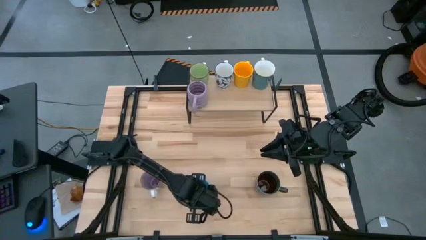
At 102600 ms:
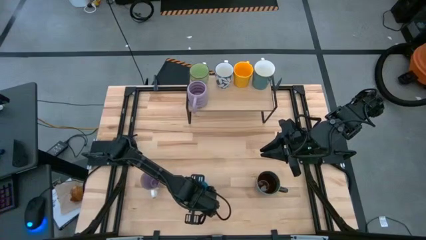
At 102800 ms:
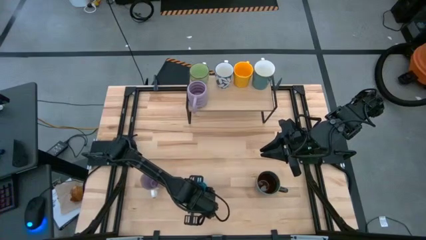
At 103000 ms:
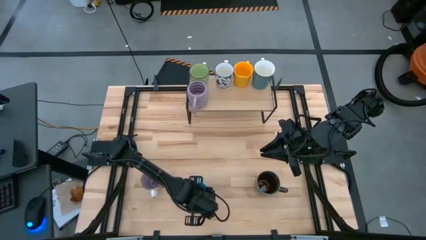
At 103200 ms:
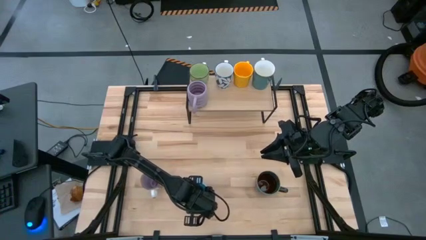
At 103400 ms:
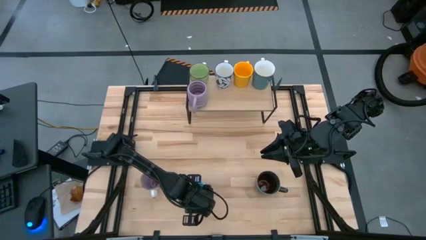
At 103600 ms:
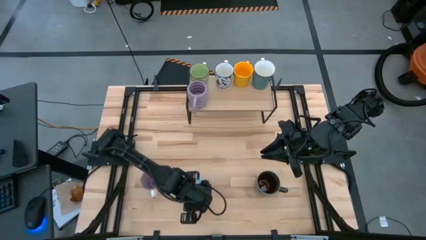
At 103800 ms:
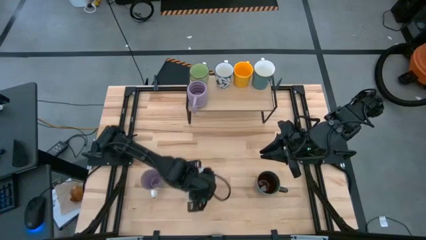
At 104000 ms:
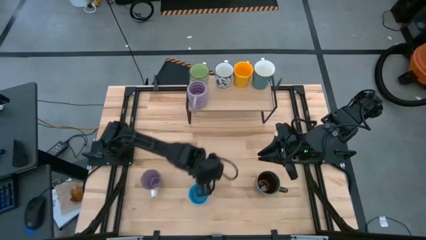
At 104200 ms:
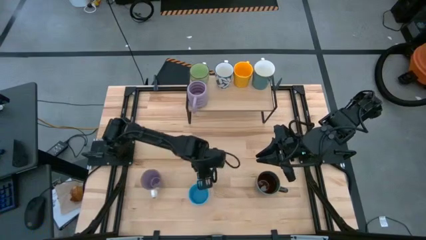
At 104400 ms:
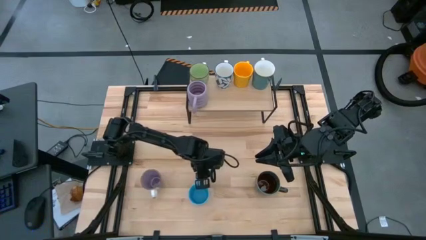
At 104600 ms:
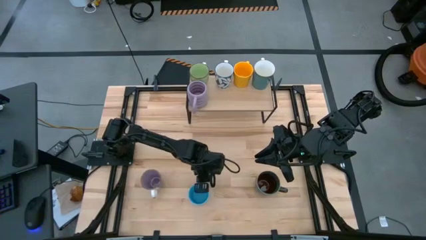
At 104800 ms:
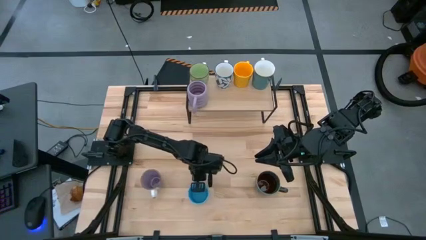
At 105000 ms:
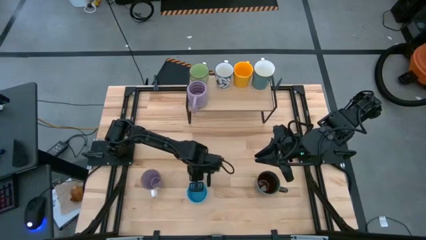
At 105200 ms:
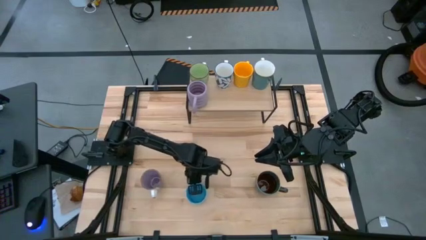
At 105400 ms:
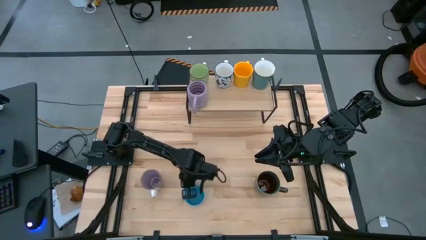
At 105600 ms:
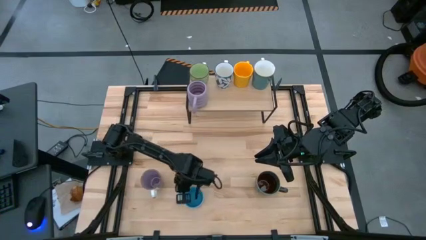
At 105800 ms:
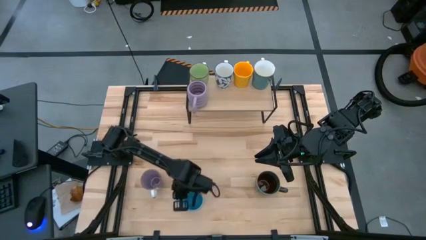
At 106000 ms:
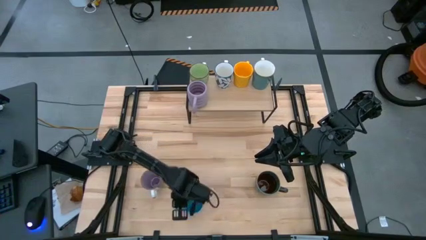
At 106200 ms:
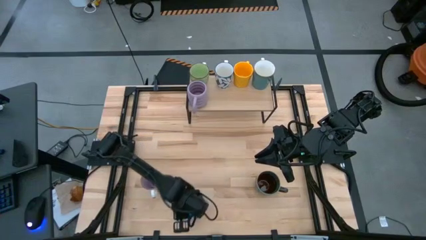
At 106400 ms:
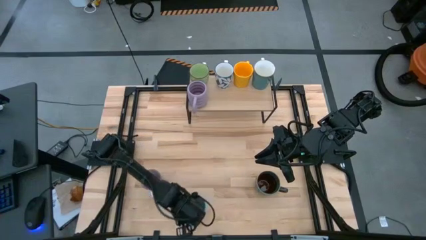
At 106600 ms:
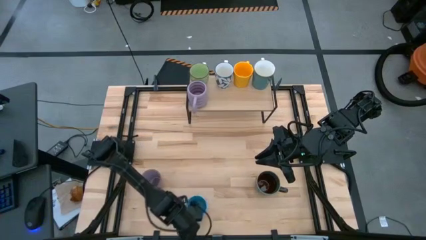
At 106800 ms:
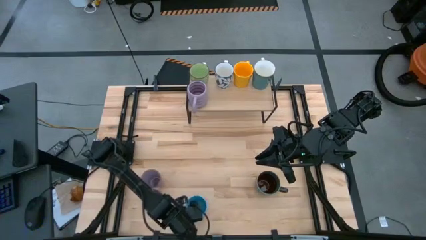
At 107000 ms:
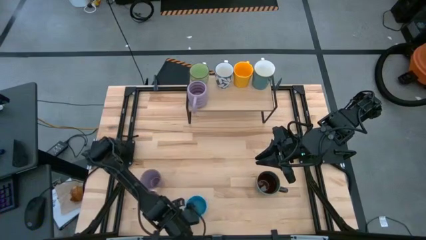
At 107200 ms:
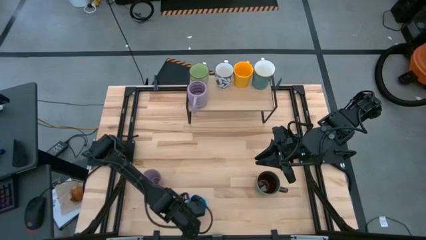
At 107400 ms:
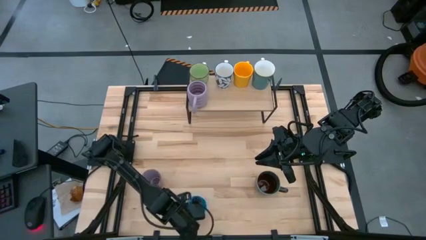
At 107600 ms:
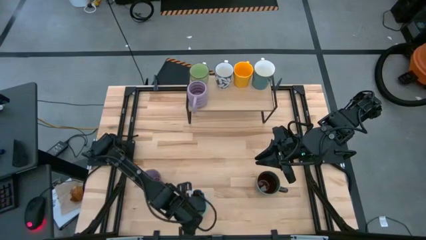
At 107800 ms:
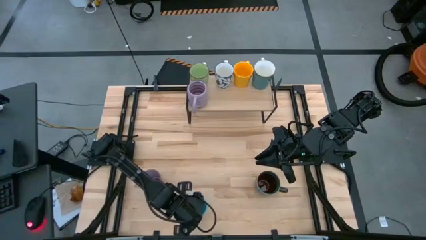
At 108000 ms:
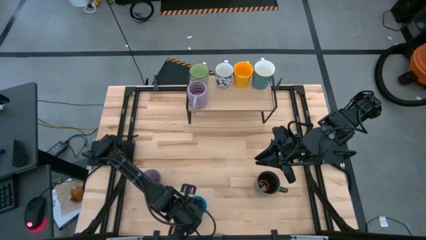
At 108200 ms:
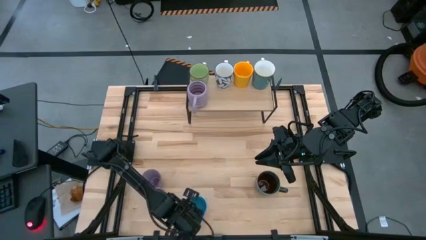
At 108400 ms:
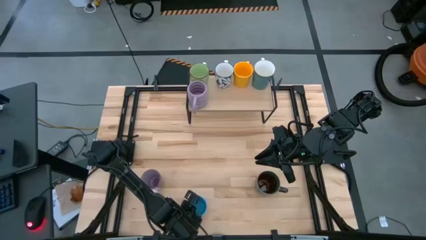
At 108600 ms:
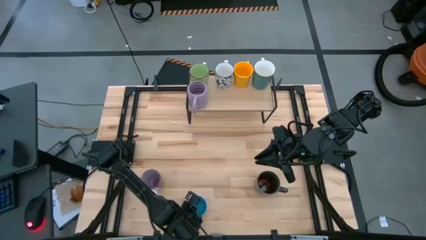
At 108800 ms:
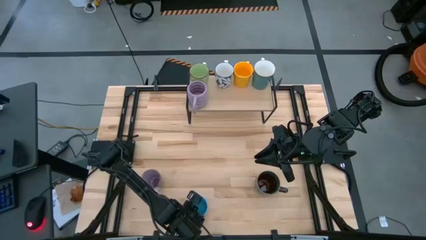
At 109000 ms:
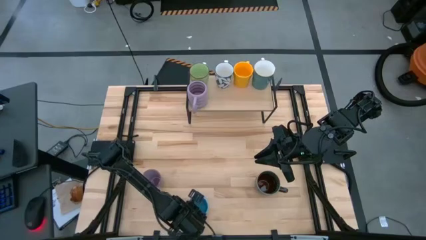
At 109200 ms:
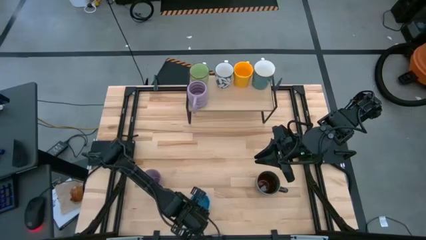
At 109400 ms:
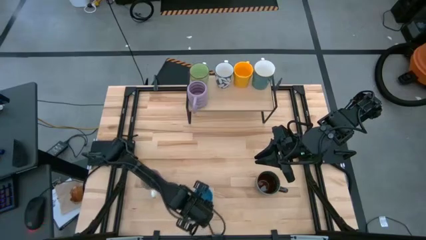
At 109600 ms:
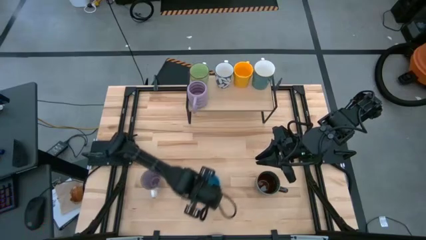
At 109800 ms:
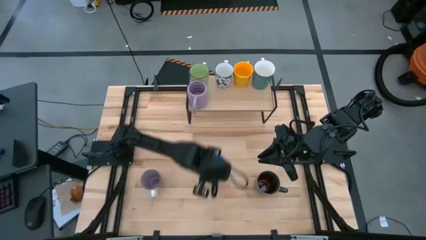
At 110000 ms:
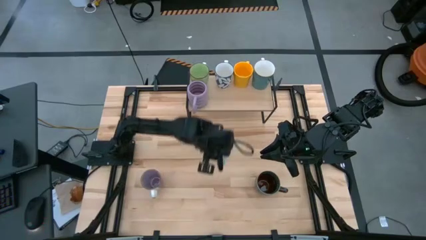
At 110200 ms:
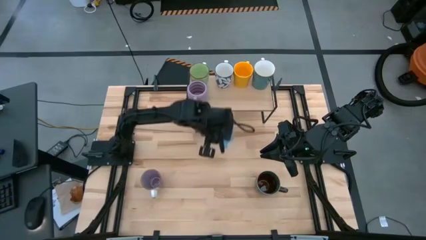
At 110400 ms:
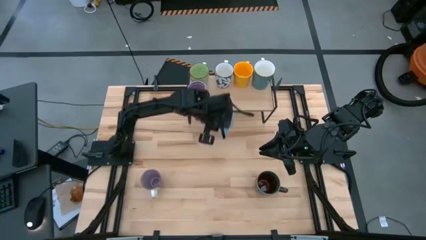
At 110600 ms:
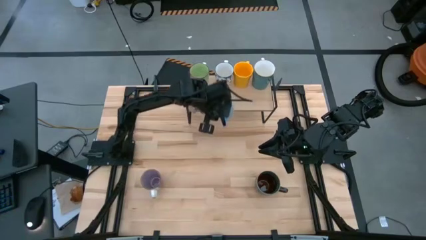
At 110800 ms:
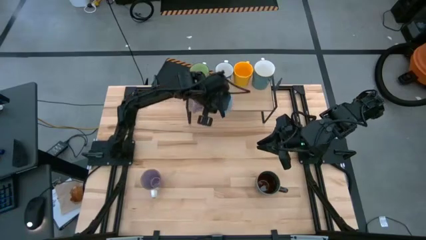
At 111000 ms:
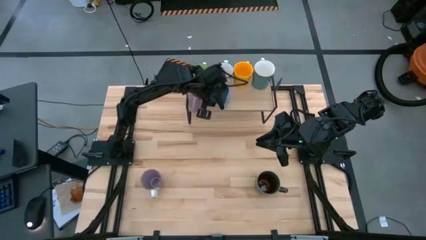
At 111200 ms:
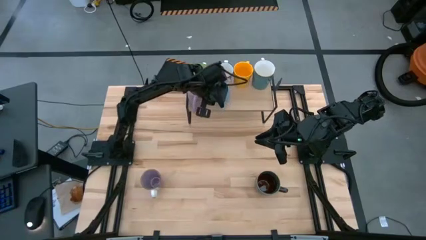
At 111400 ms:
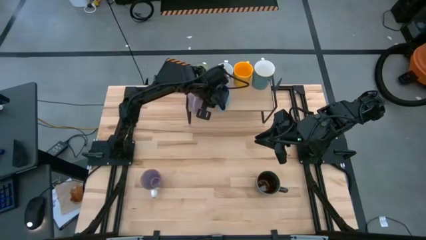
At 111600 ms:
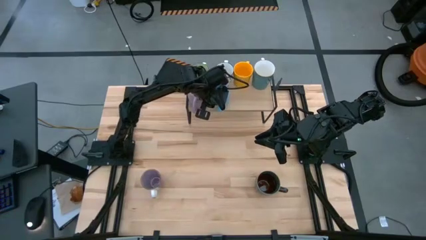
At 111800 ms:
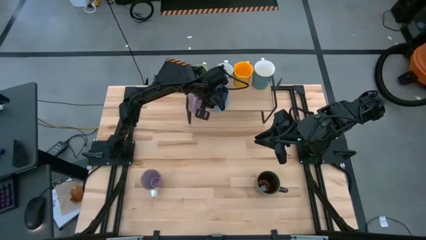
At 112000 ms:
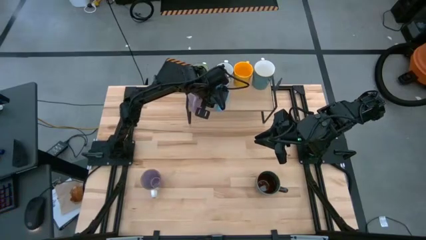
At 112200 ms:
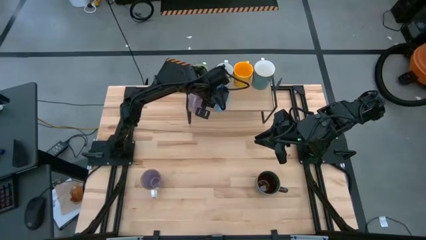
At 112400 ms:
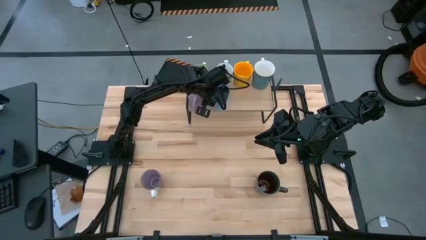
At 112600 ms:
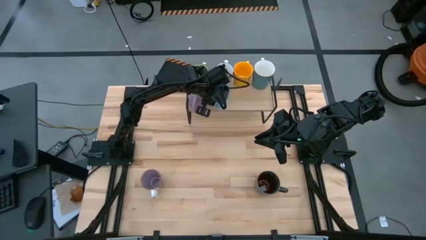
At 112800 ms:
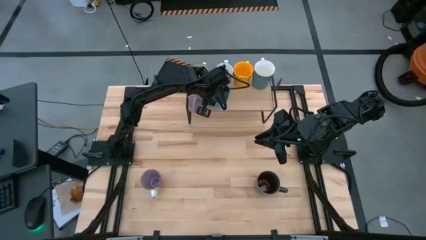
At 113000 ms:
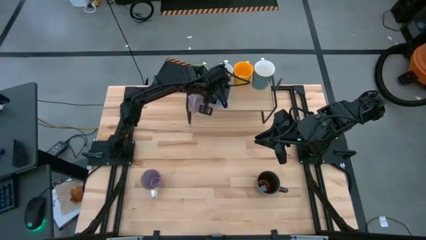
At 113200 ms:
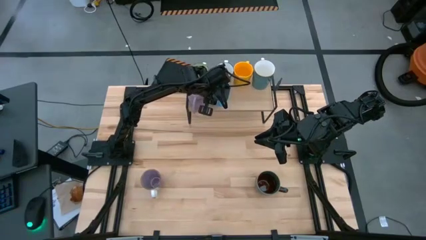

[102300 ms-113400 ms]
Task: Place coffee mugs
Put the blue mug on the shelf

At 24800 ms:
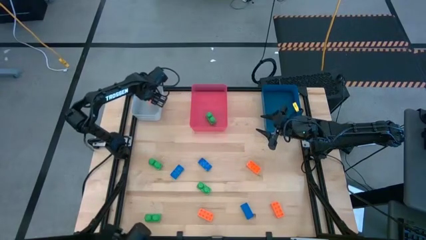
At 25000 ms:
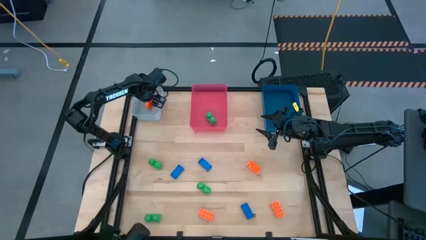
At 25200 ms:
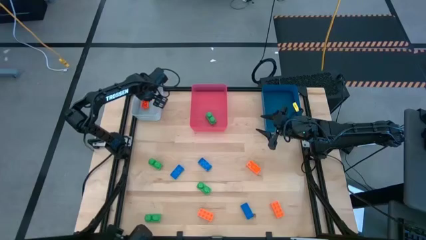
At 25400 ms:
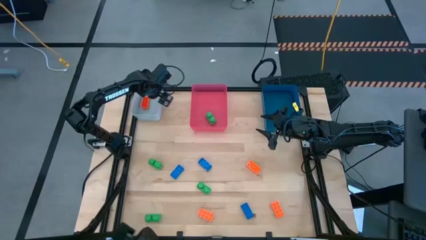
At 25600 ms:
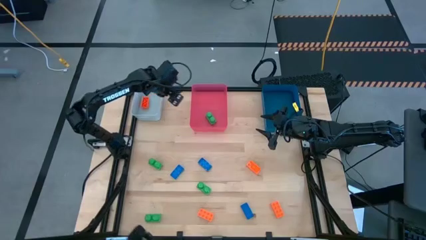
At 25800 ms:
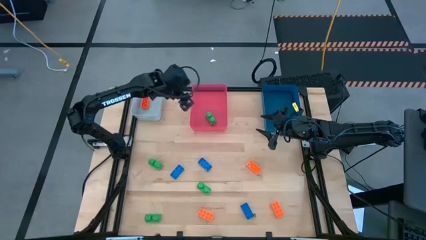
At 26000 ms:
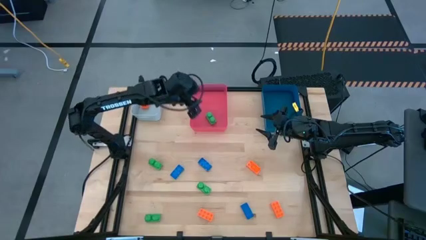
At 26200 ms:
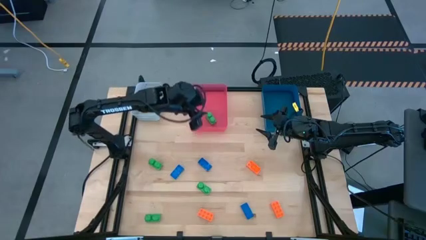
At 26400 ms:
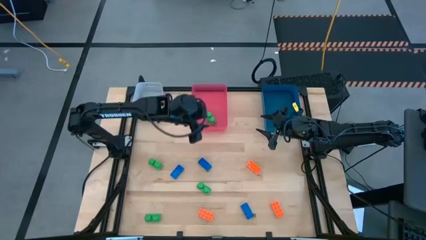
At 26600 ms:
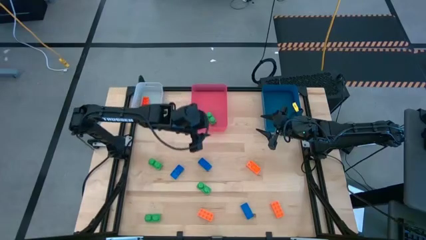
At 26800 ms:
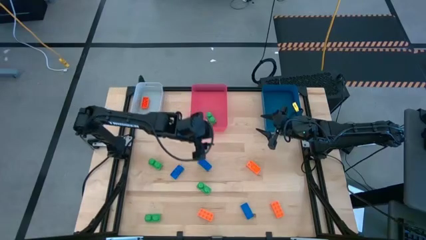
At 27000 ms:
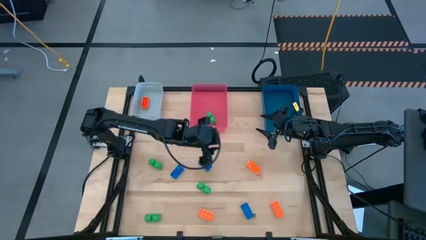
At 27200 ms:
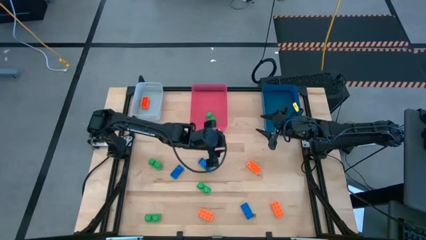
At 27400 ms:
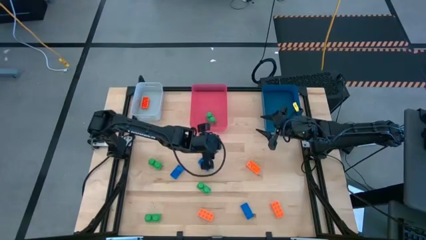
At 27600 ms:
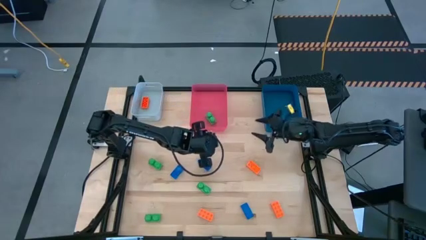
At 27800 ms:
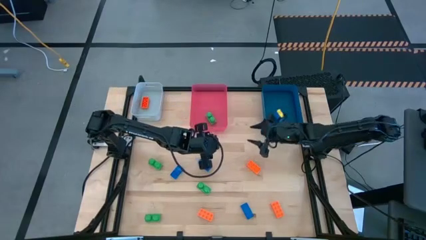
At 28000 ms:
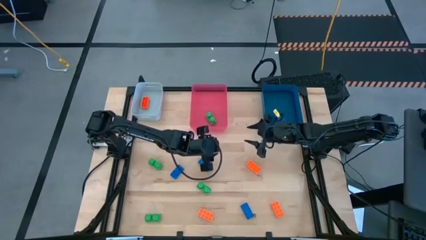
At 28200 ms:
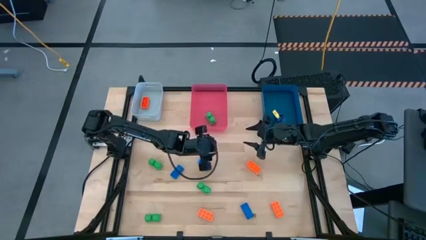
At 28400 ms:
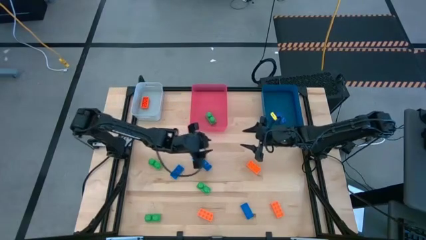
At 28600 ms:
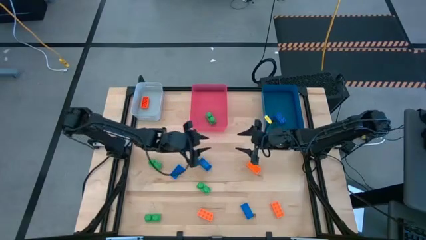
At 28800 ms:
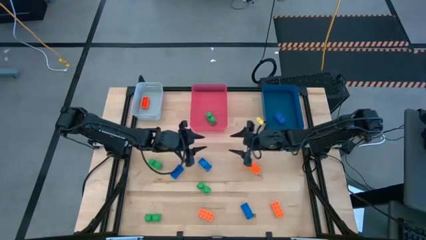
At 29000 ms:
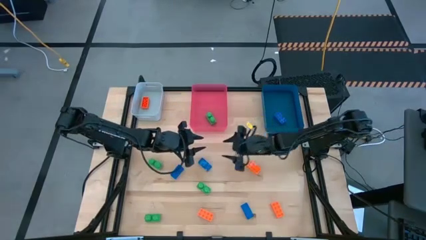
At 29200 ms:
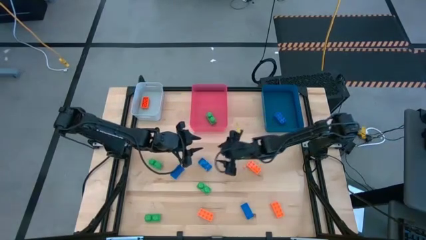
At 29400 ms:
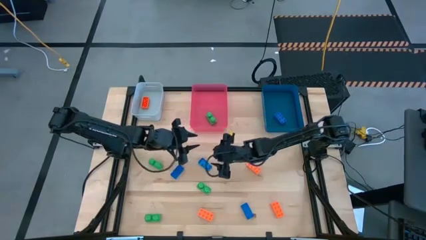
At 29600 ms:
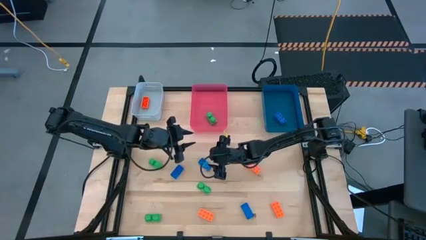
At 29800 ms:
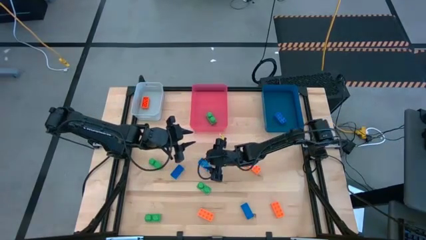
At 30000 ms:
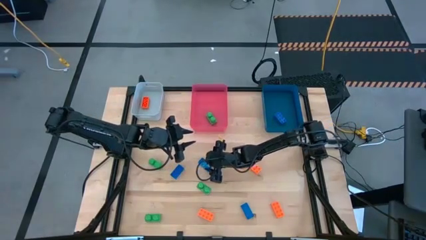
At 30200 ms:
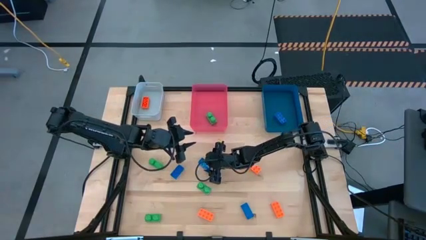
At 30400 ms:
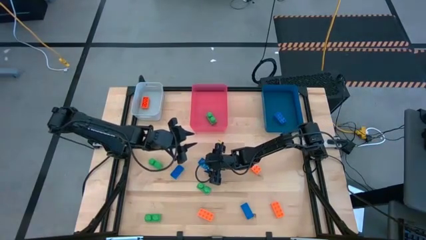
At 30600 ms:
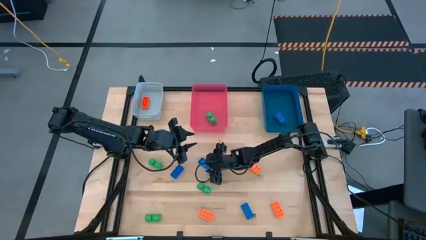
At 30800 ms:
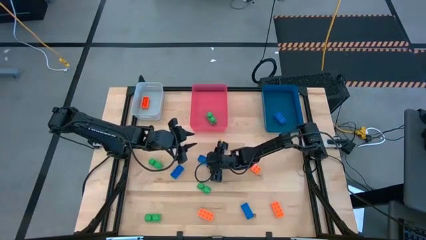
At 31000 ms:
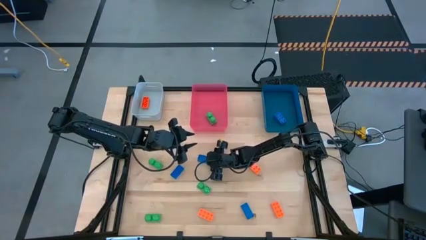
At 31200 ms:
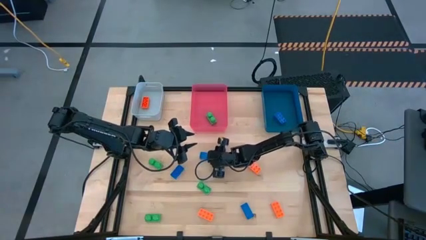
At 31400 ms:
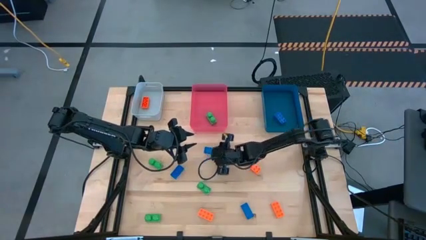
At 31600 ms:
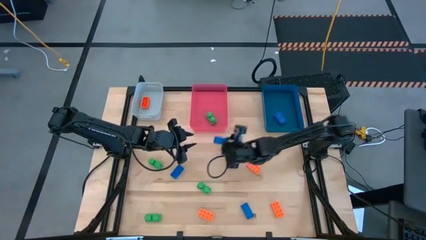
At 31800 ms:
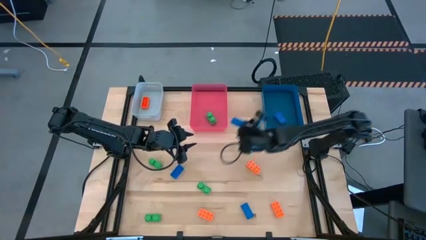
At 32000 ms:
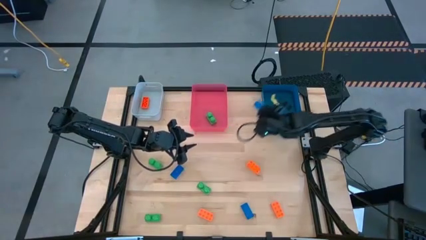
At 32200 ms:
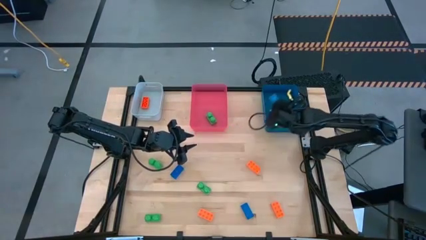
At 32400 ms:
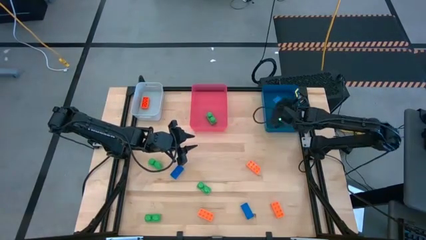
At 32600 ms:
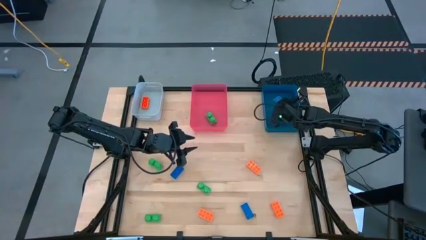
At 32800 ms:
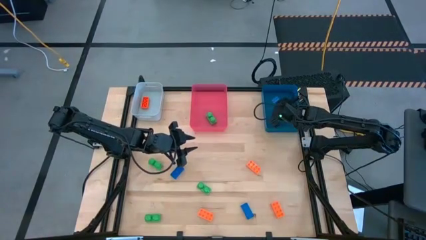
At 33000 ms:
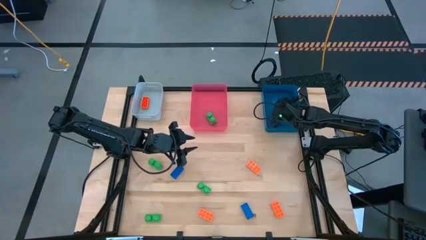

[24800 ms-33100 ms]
Task: Sort & place blocks by color
Put the blue game piece into the blue bin
